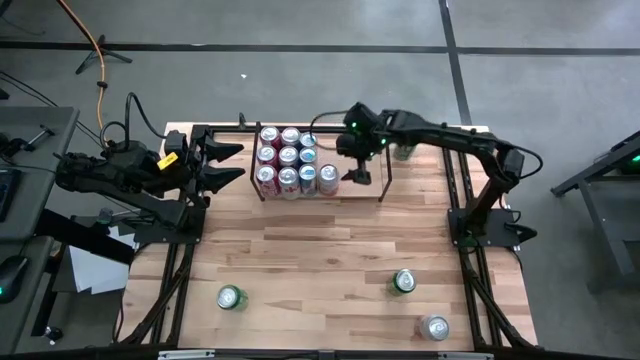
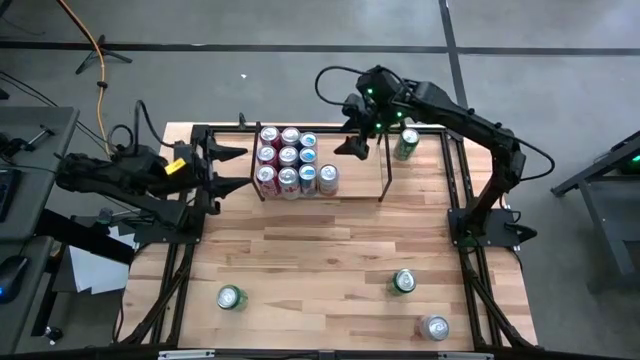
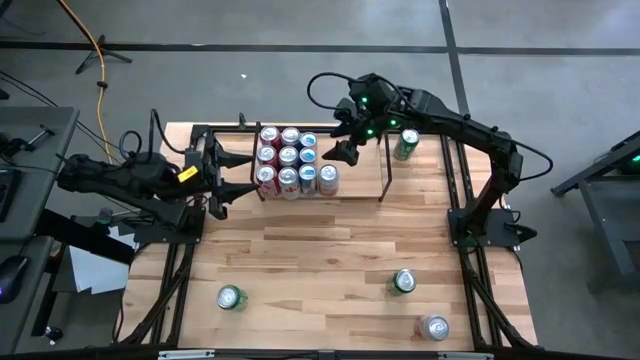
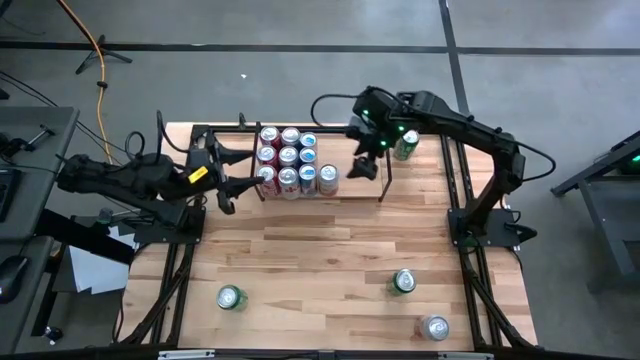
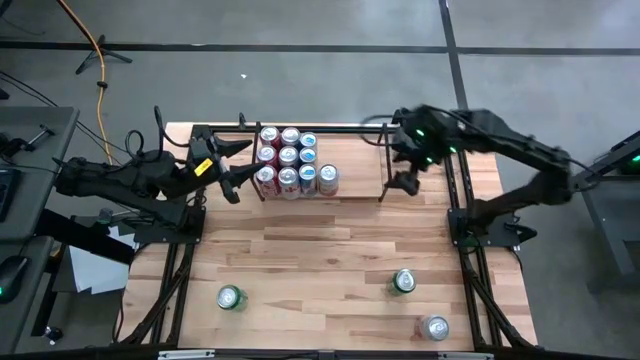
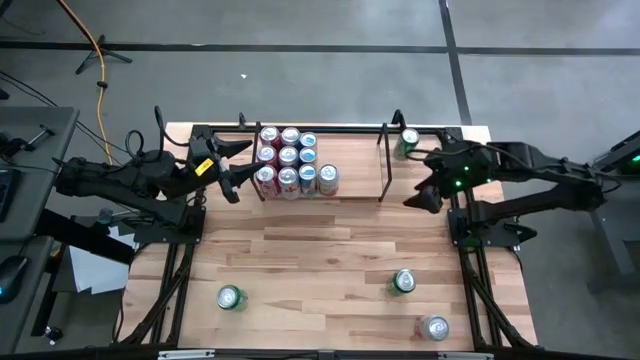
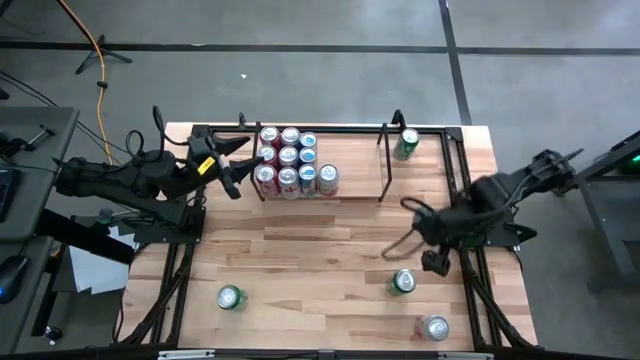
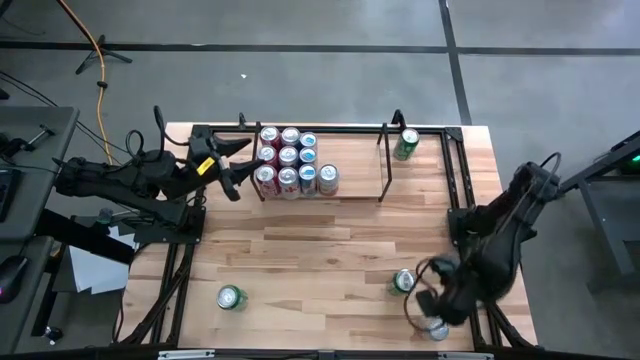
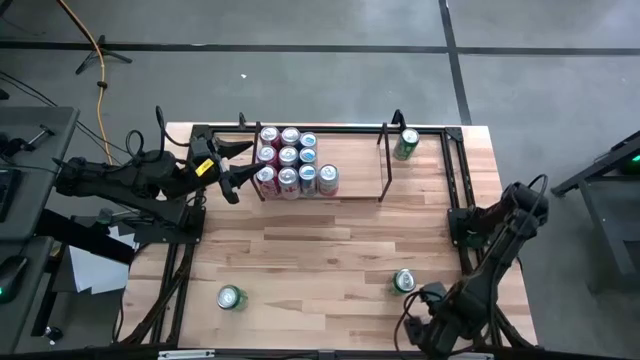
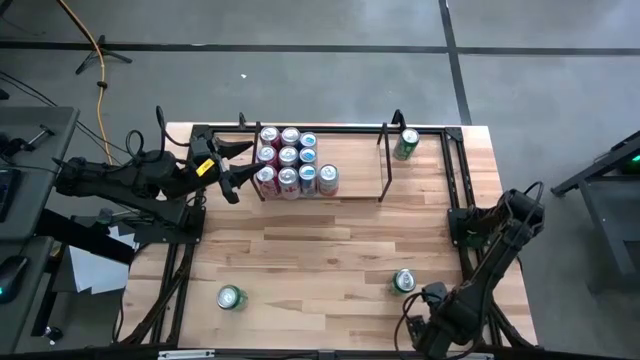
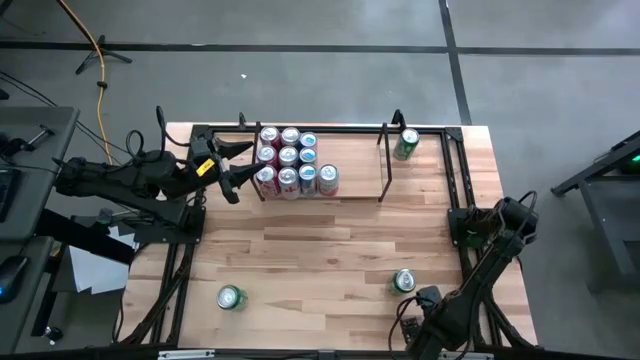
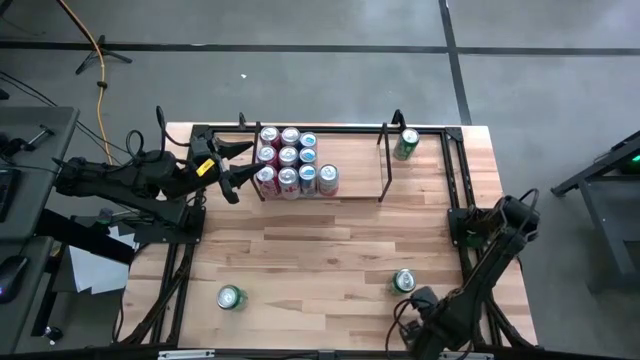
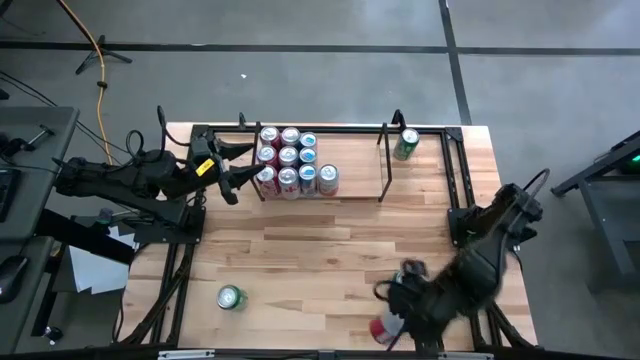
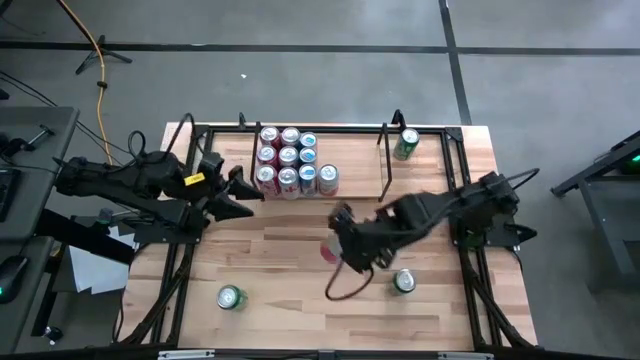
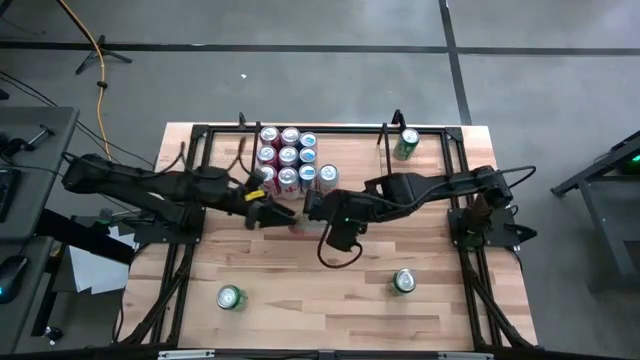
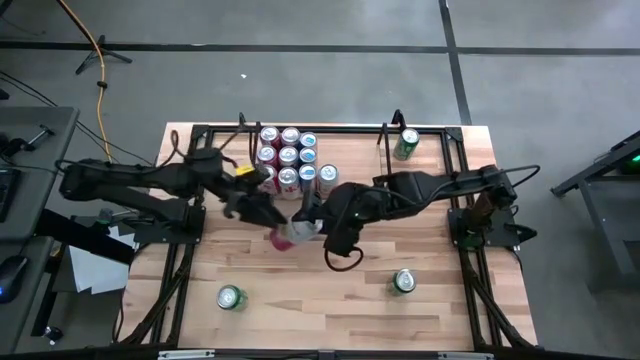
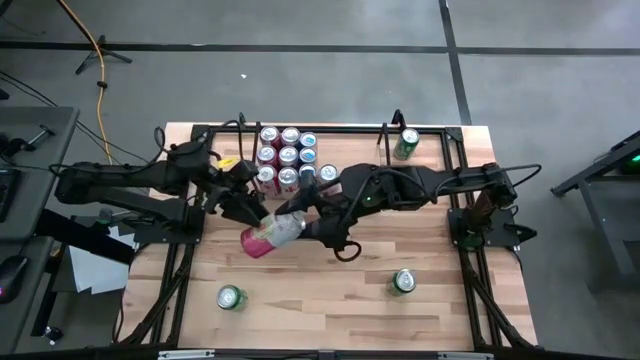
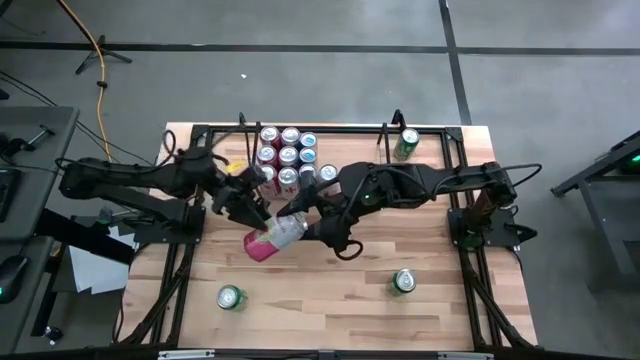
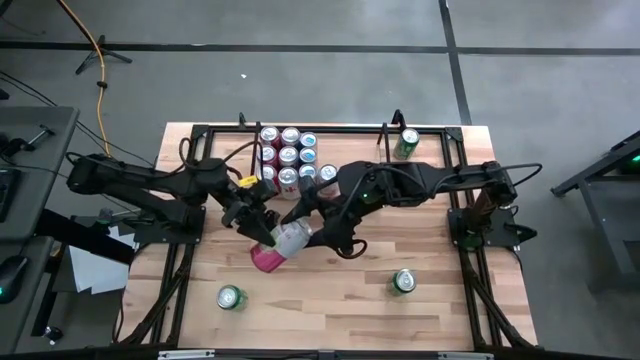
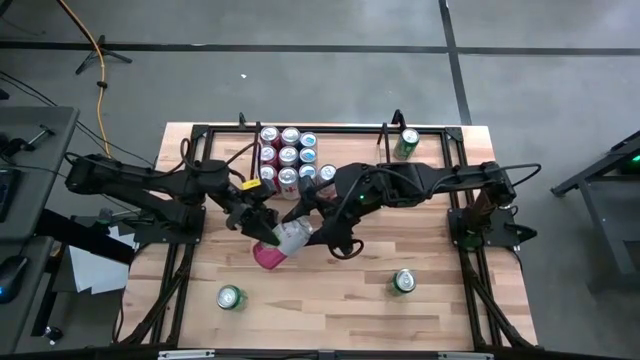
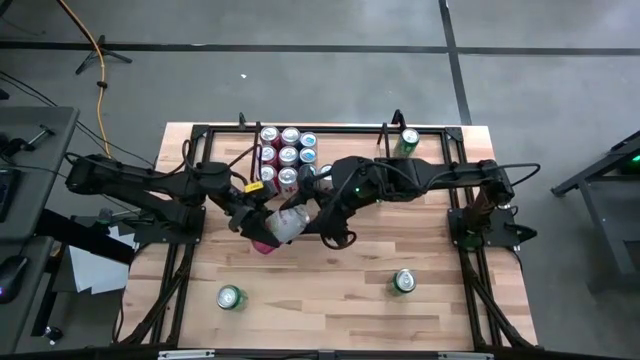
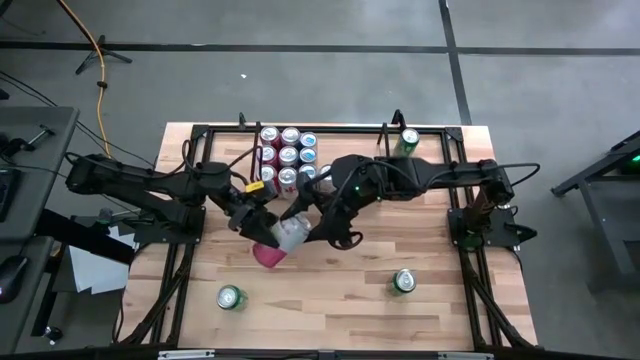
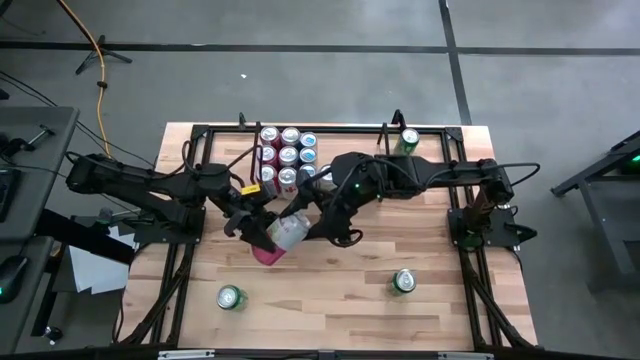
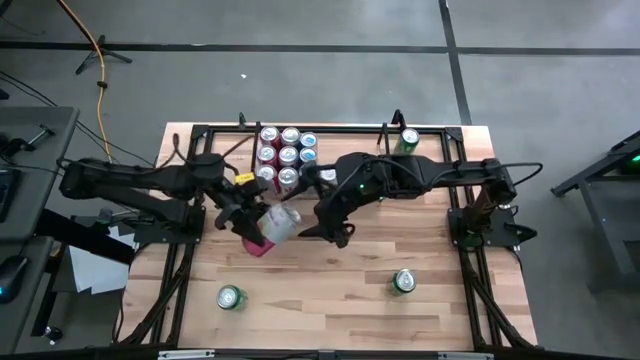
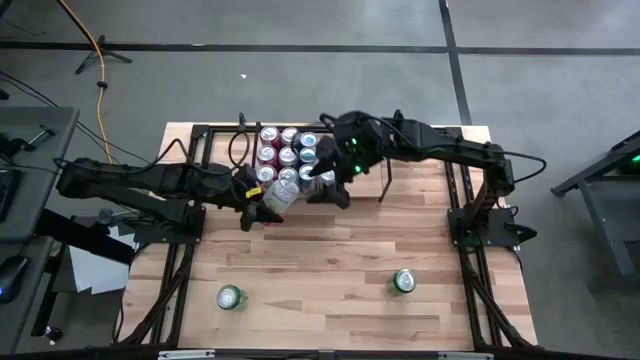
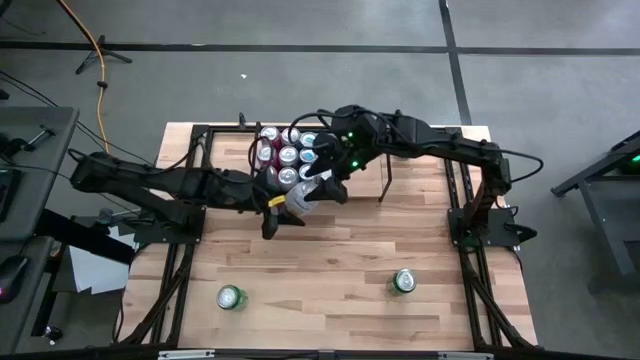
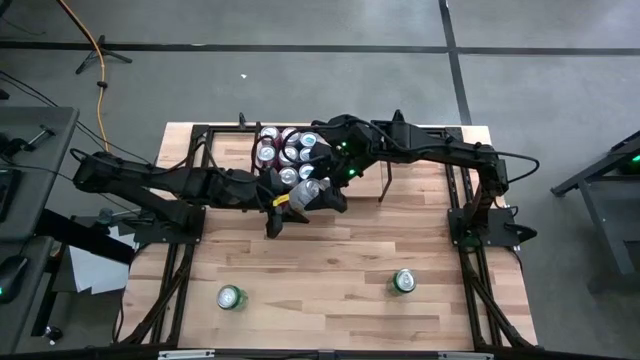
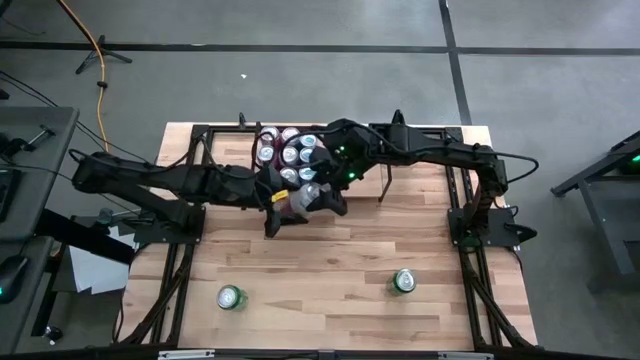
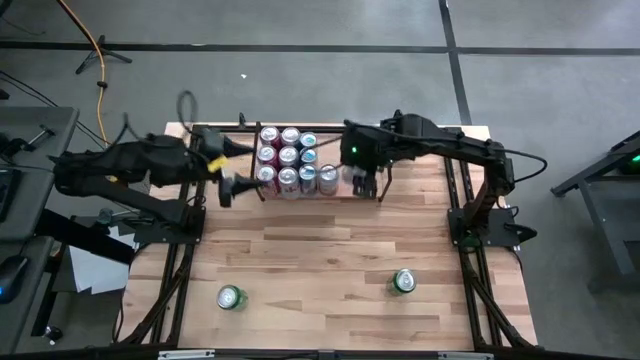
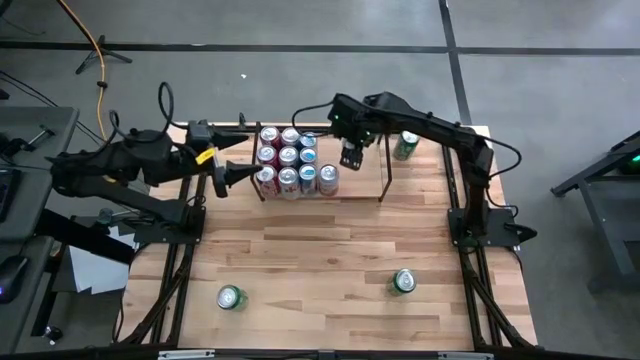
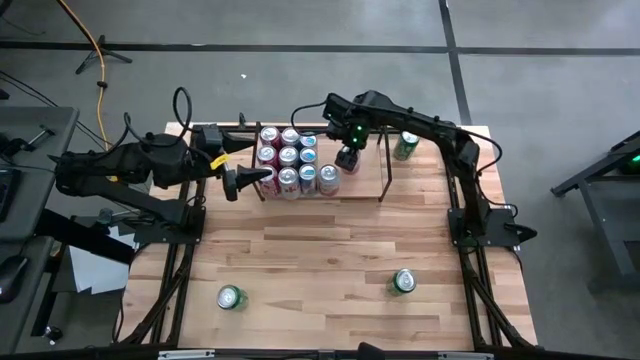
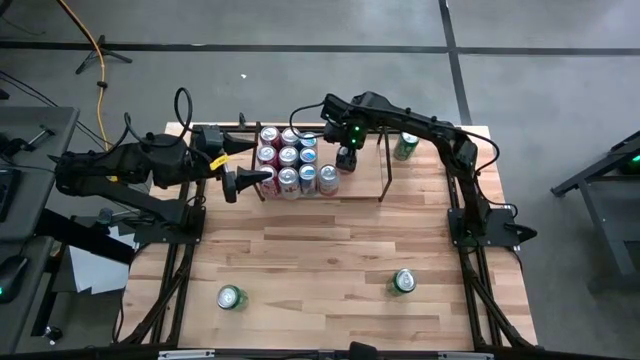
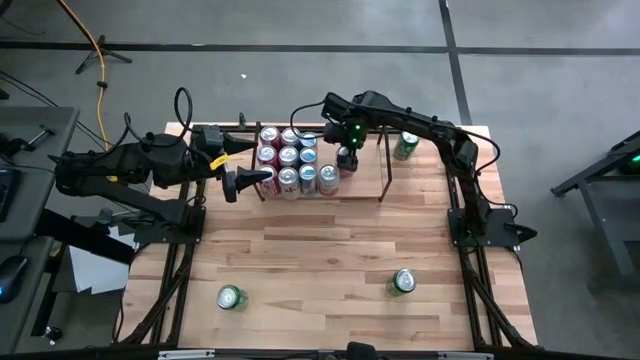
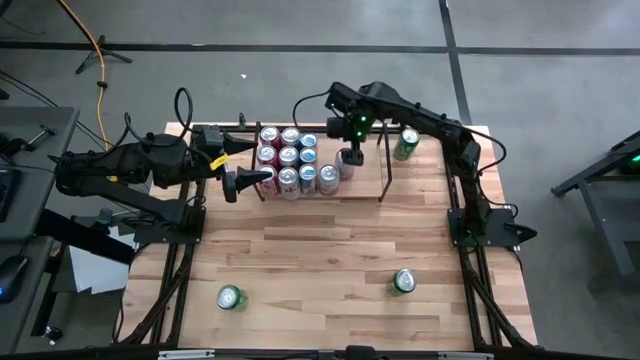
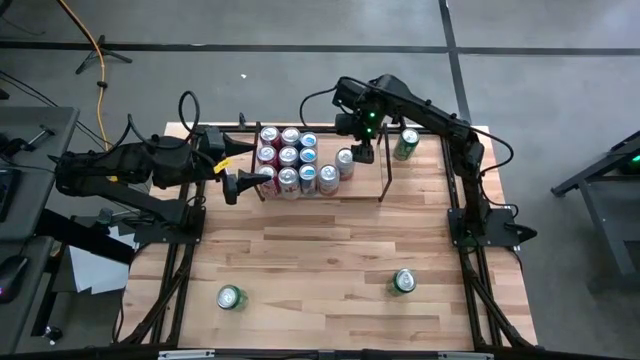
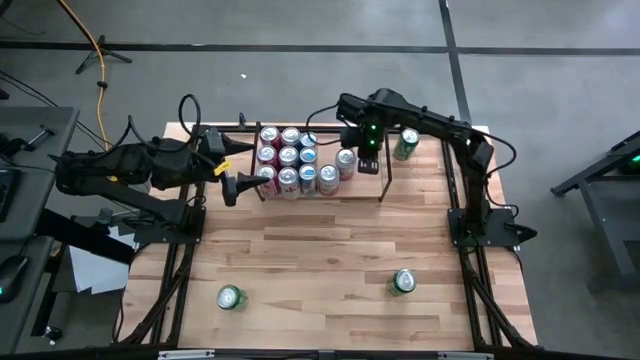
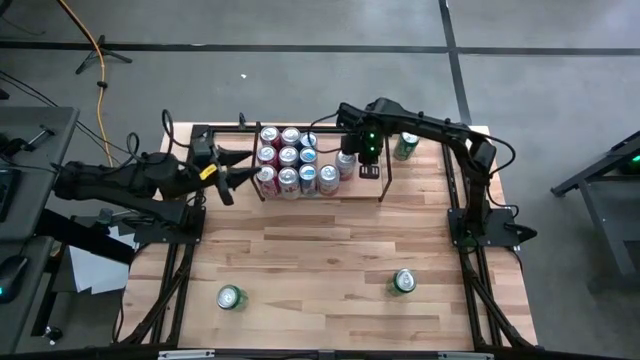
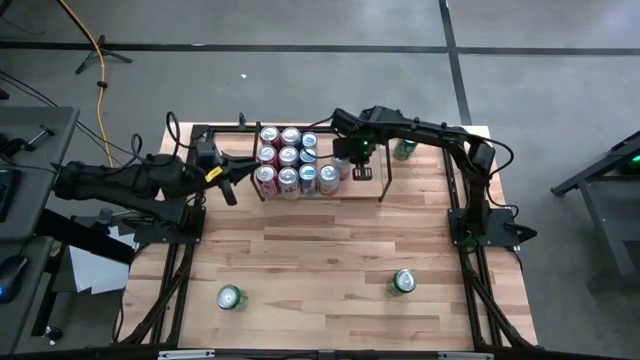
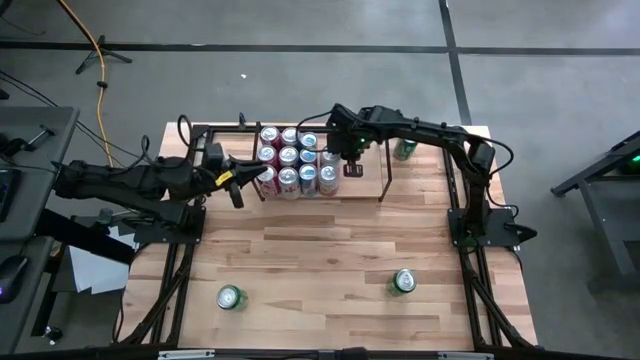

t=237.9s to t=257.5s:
Task: Place canned beverage on shelf
Put the pink soda can on the shelf aligned with the other pink soda can

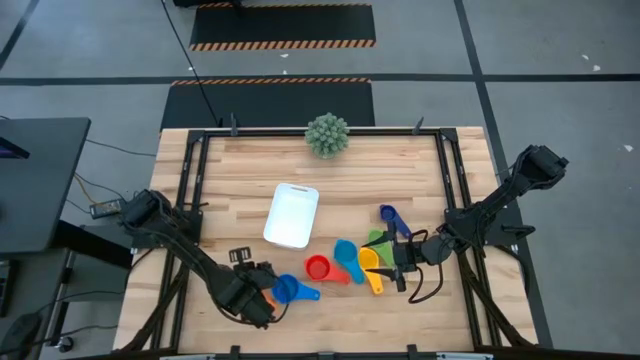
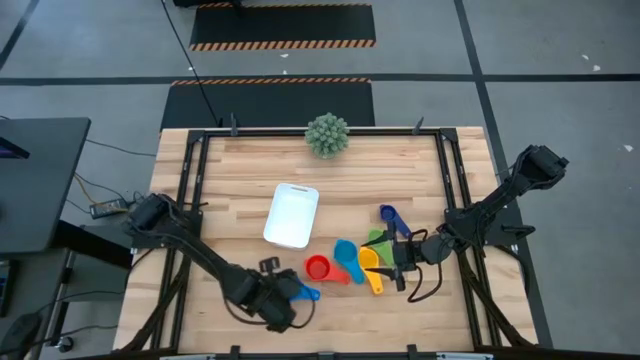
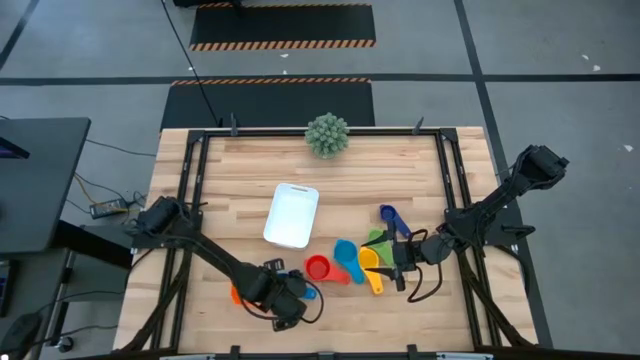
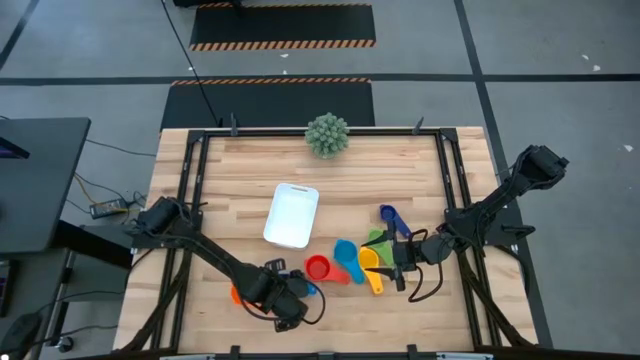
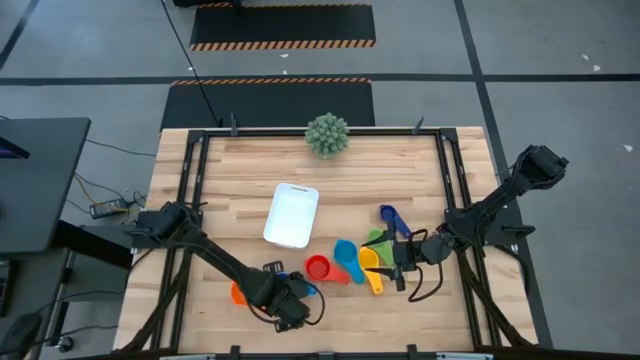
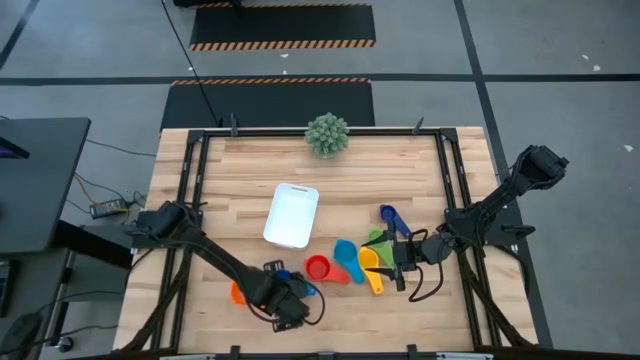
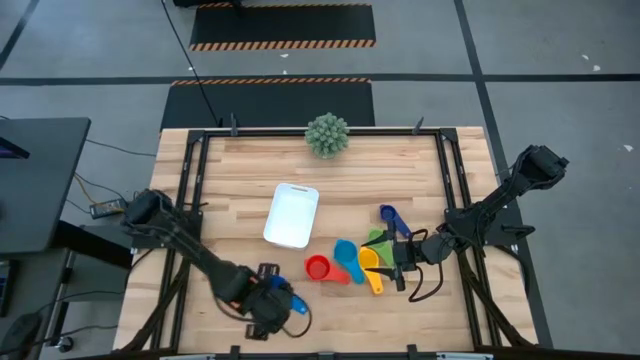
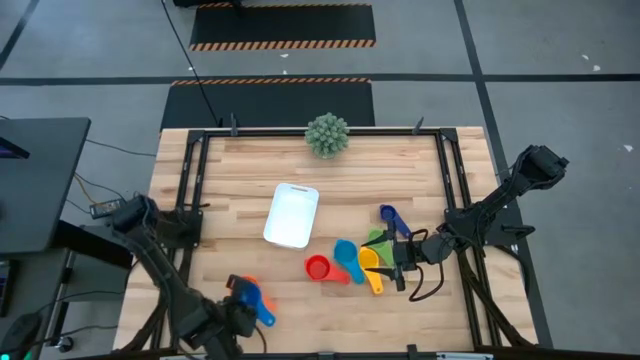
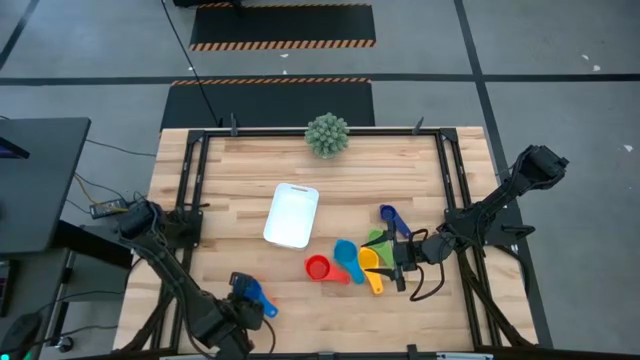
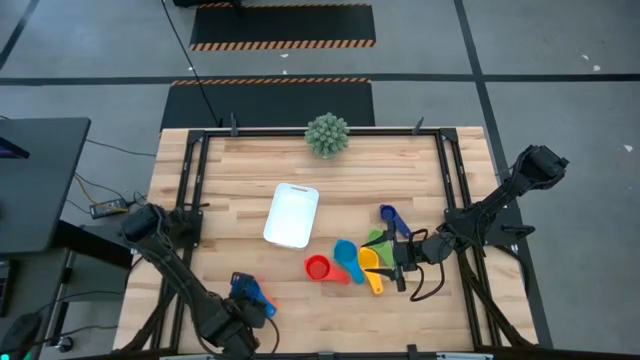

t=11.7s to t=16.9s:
Task: Nest measuring cups in basket
Stack the blue measuring cup on the top of the orange measuring cup
